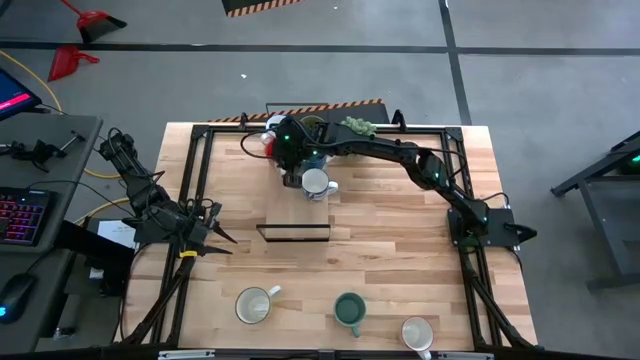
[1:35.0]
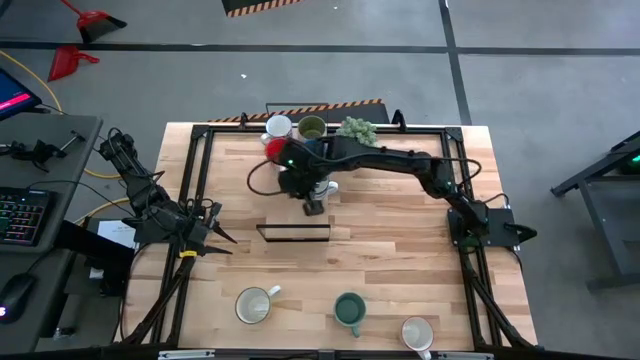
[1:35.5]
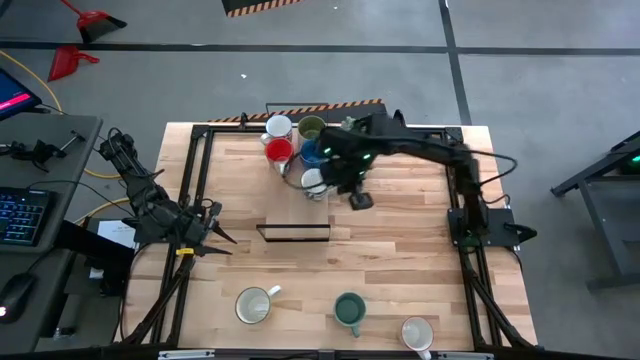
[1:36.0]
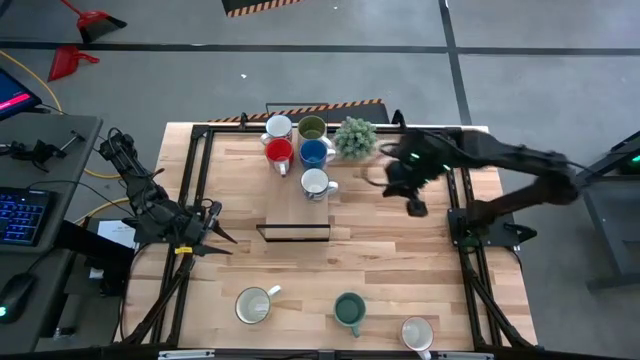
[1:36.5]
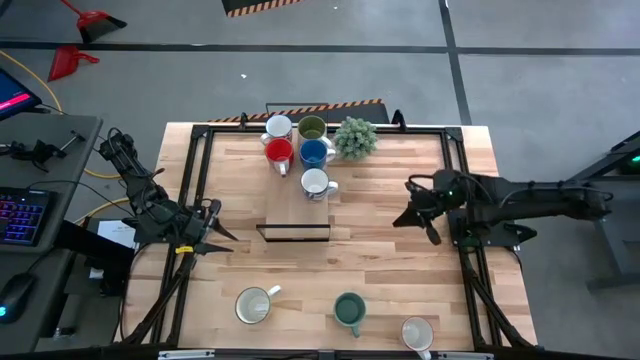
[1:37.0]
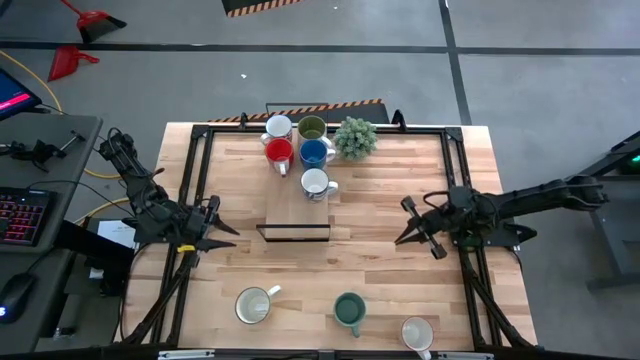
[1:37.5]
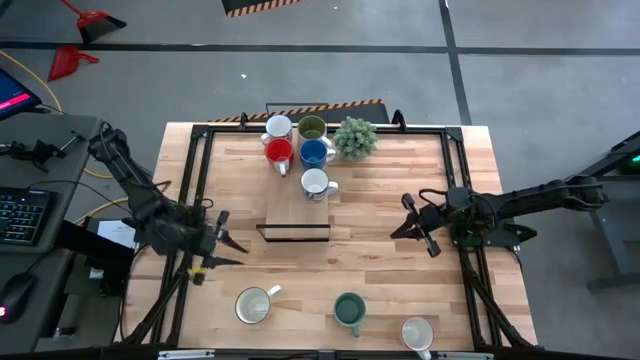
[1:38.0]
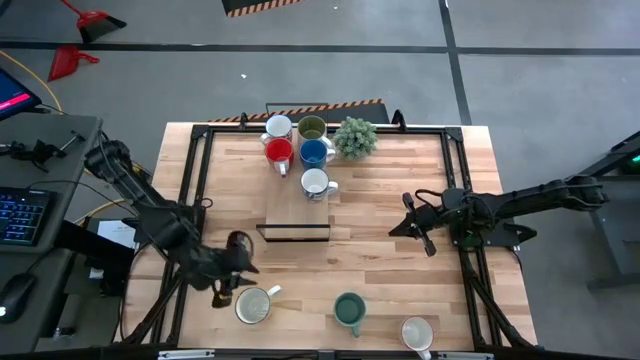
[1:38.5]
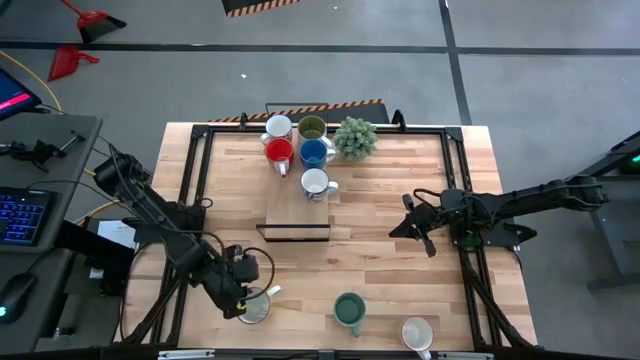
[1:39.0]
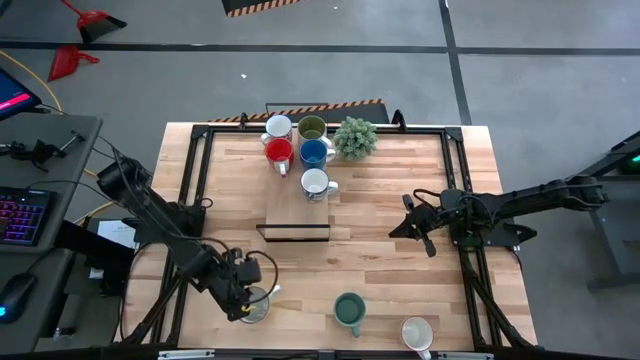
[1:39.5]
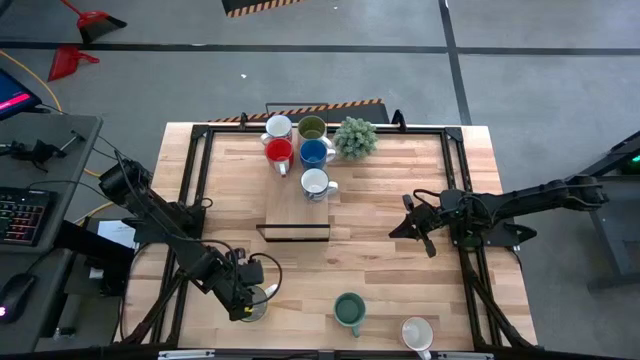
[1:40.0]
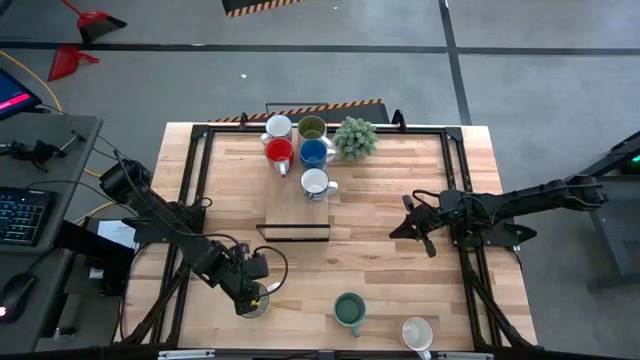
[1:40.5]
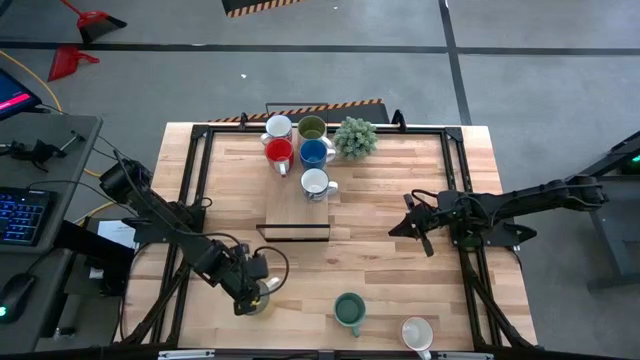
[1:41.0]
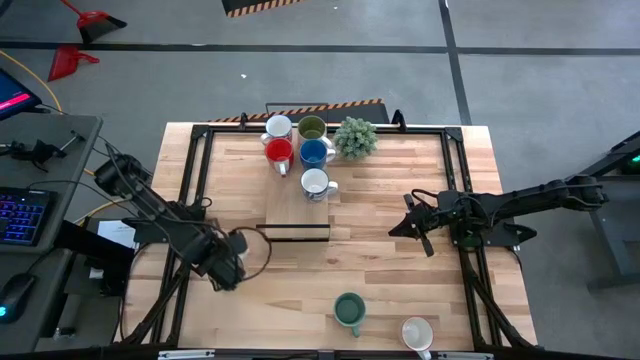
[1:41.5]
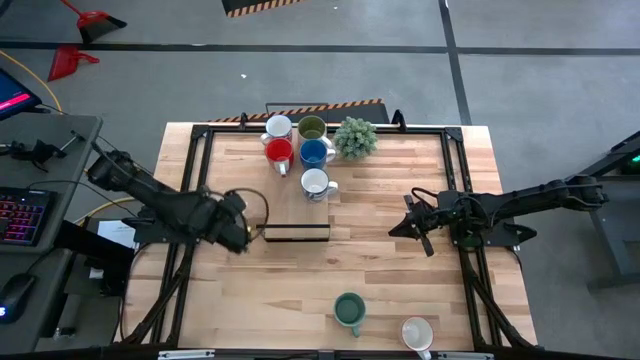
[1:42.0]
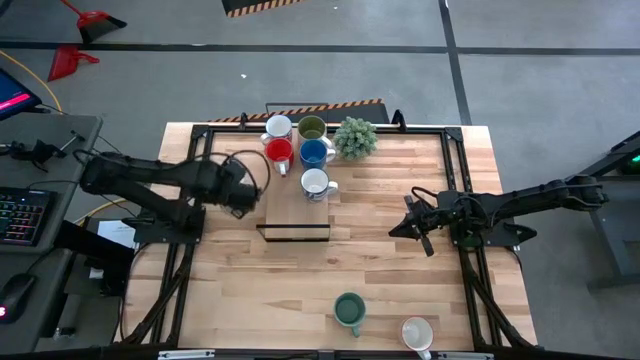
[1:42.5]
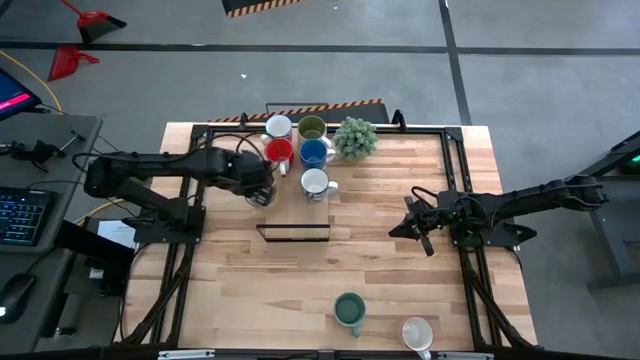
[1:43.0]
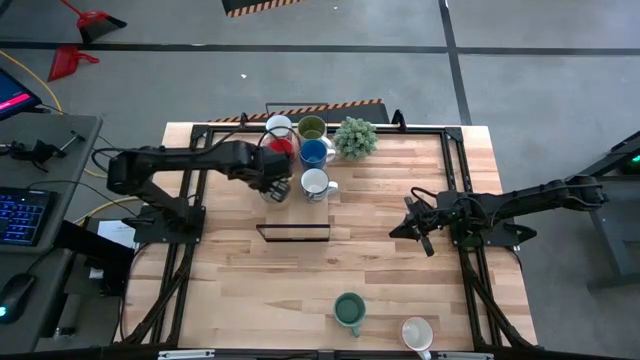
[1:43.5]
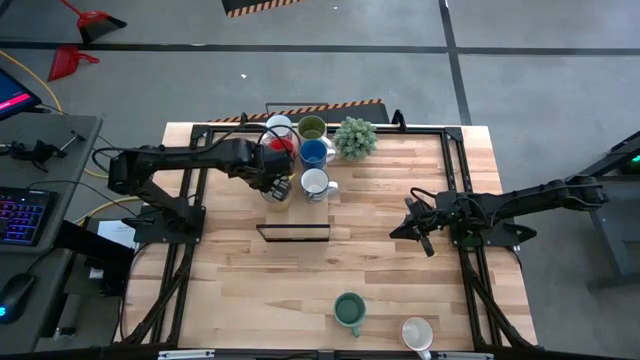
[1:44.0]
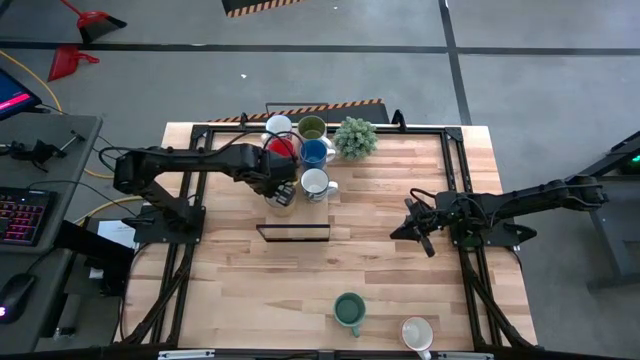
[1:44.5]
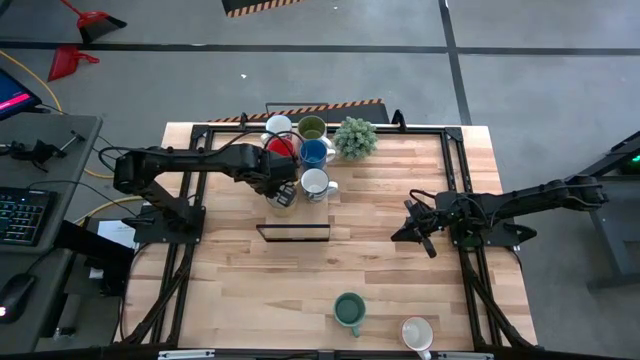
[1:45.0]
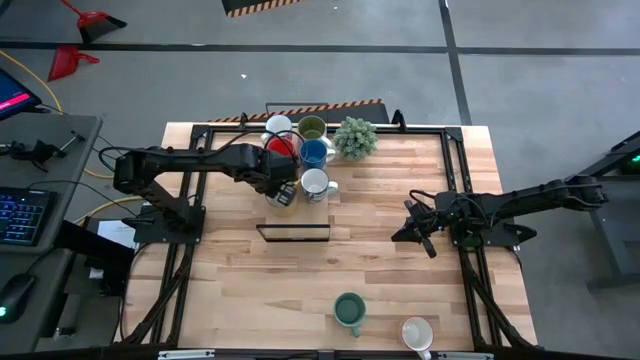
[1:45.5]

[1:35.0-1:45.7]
Task: Place coffee mugs
Put the yellow mug on the shelf

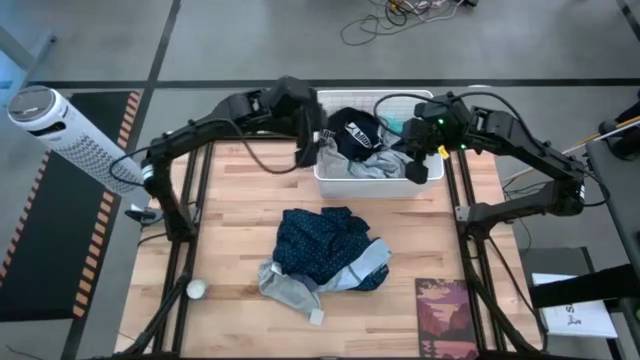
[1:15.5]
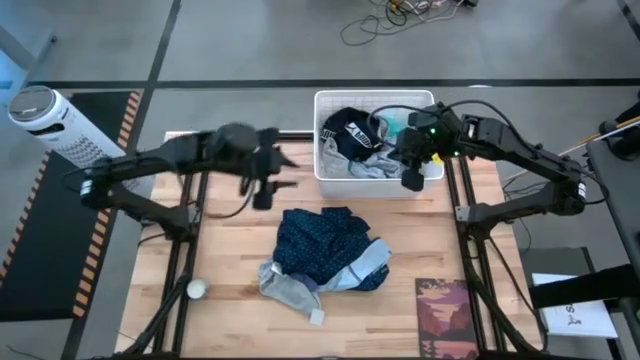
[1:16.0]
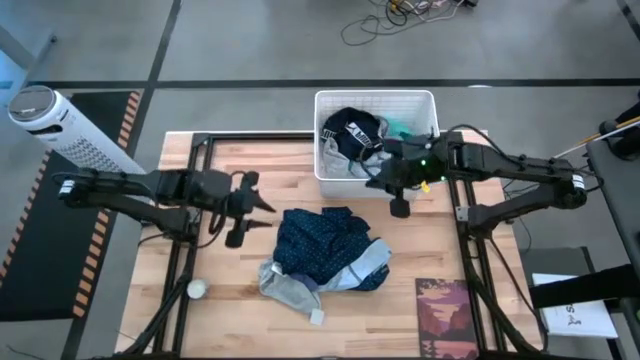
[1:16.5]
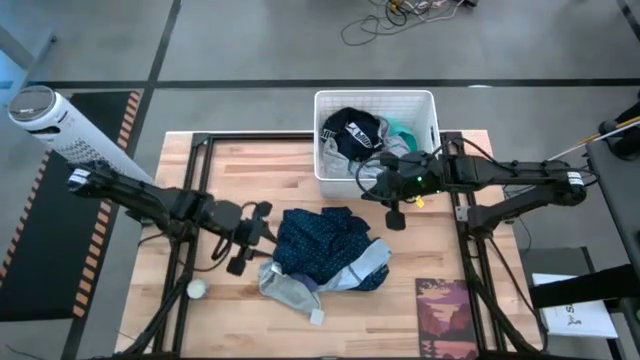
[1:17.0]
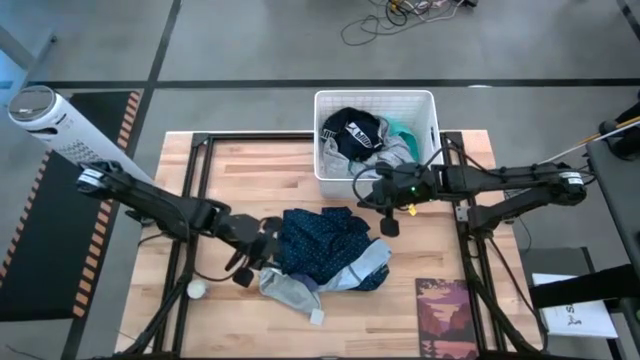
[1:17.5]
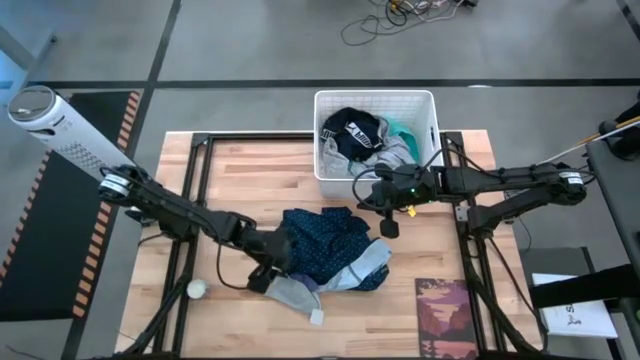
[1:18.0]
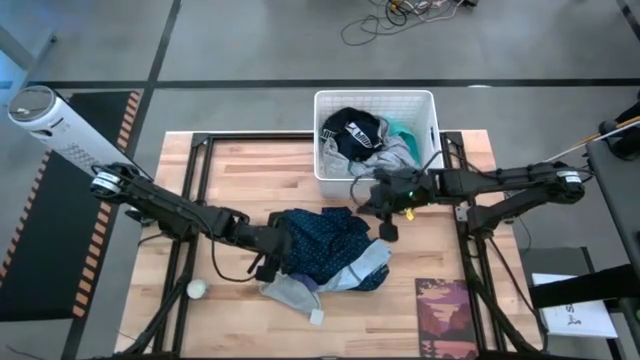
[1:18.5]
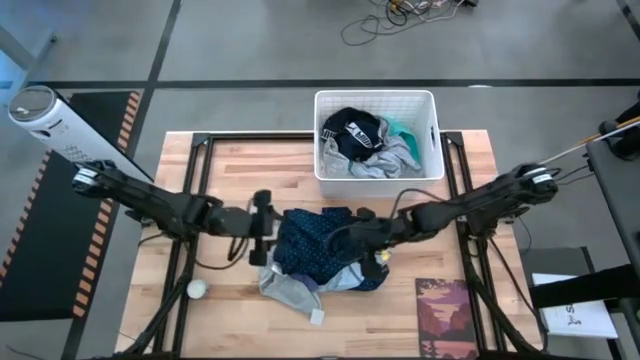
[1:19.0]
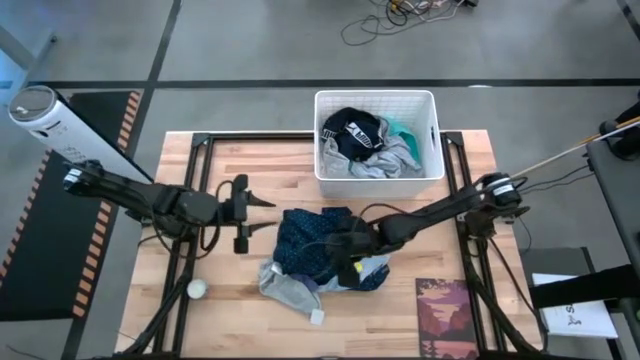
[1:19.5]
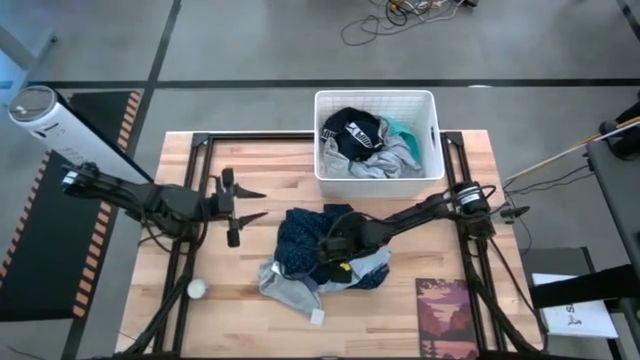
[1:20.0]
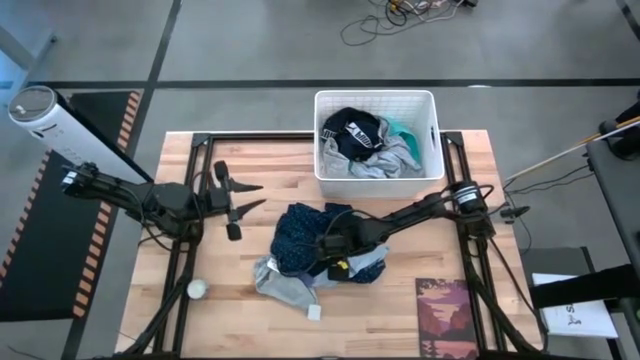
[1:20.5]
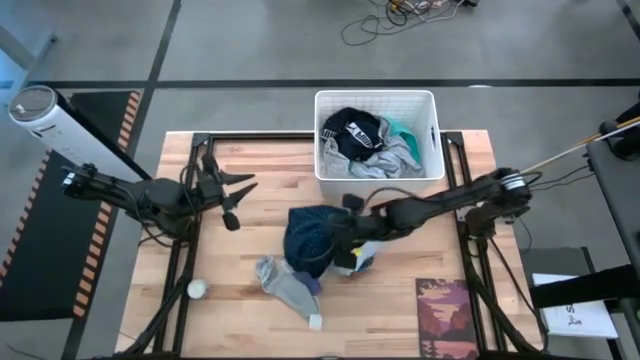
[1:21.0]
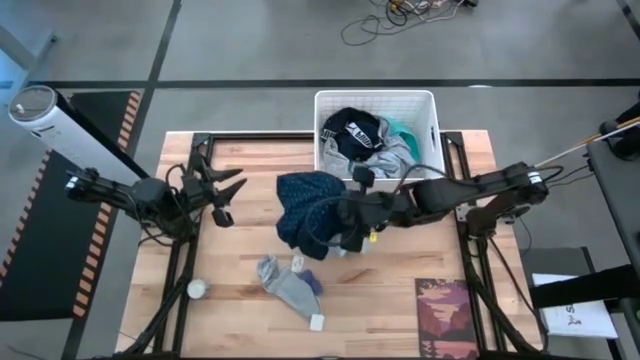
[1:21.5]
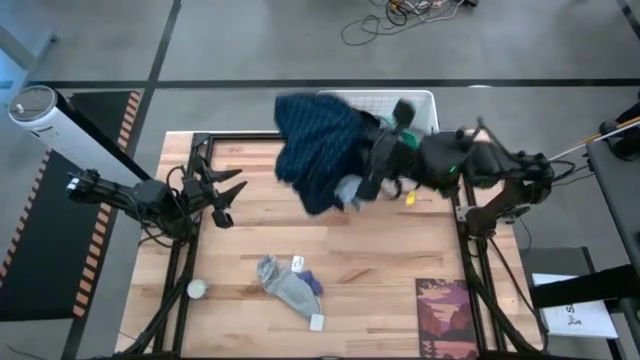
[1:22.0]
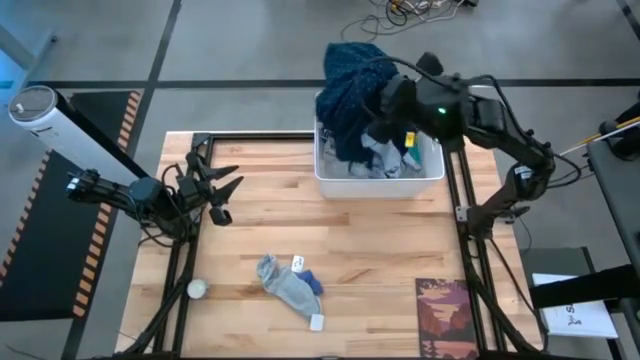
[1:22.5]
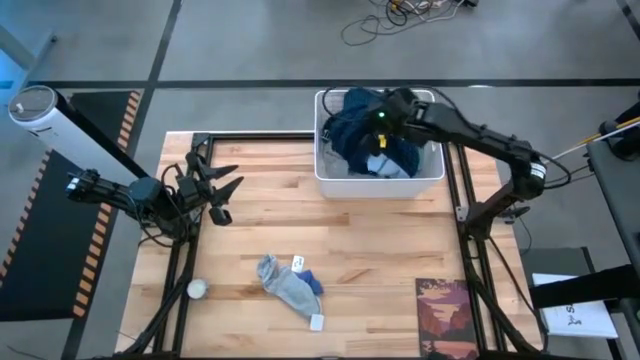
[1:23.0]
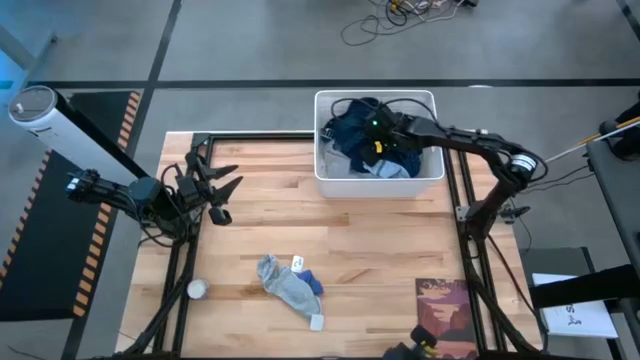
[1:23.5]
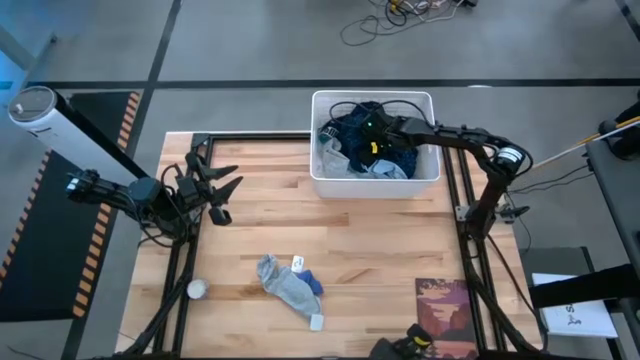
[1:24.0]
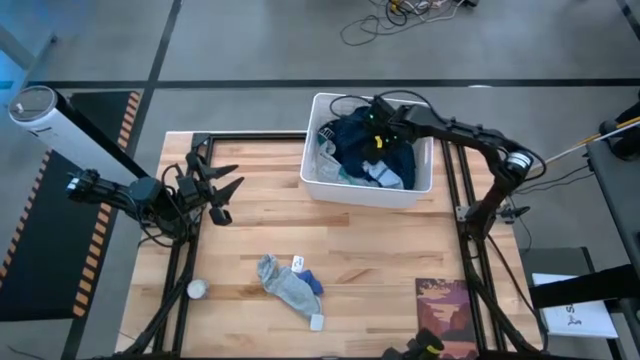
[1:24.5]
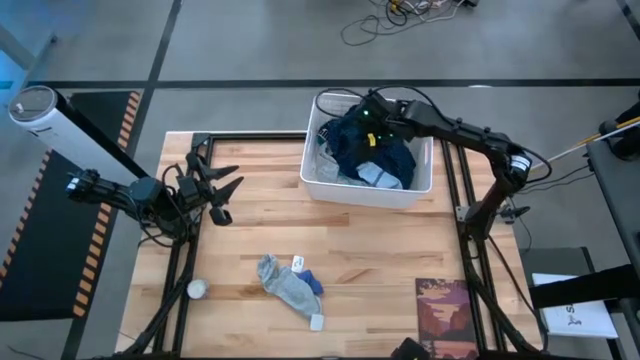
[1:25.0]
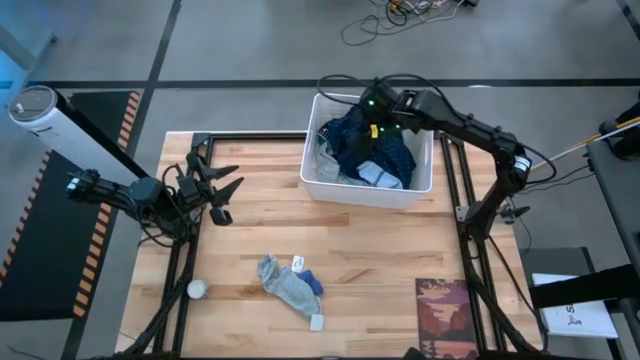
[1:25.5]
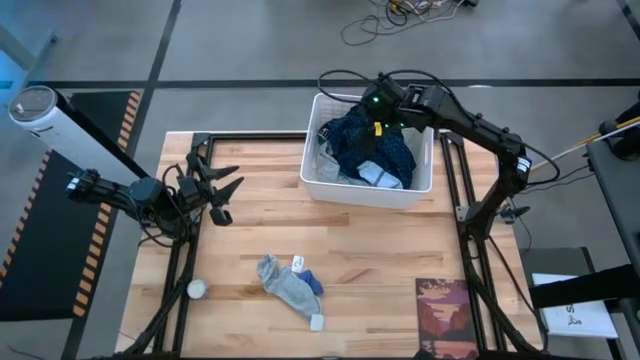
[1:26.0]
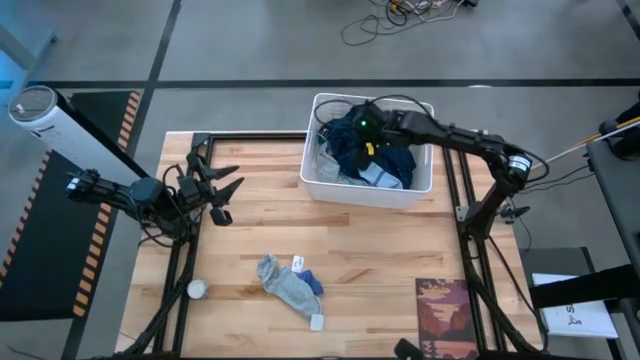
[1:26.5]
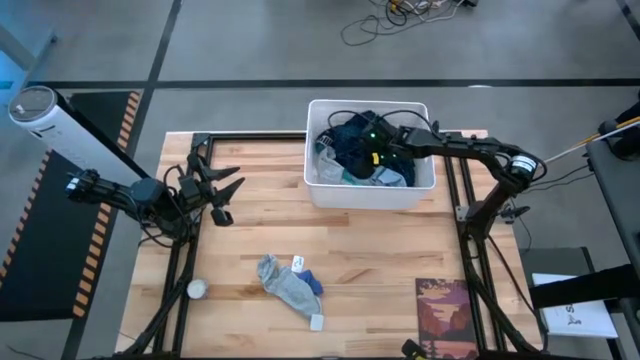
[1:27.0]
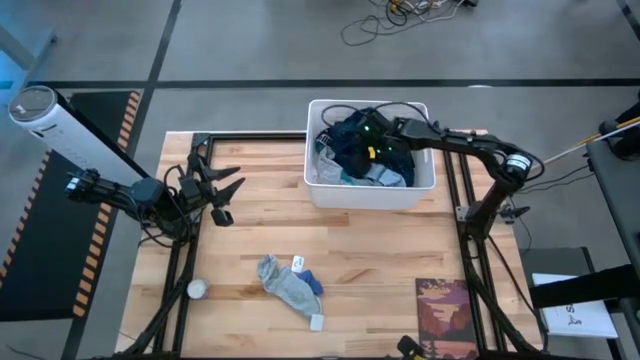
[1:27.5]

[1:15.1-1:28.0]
Task: Sort clothes
Put the blue polo shirt into the white laundry bin
